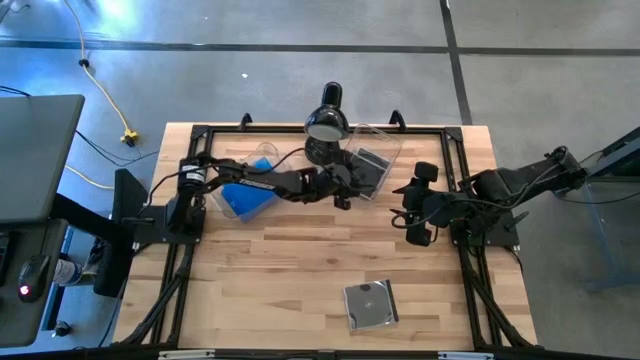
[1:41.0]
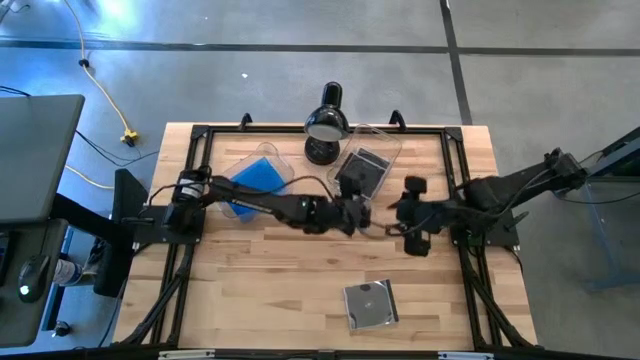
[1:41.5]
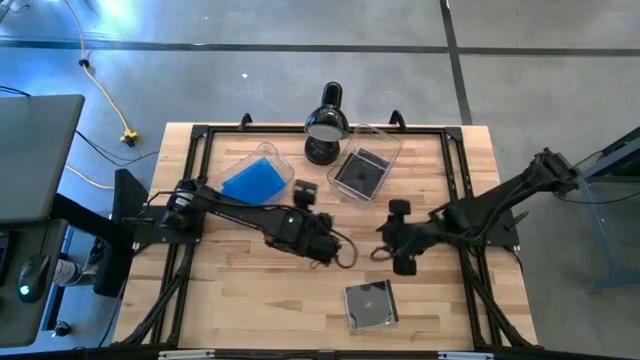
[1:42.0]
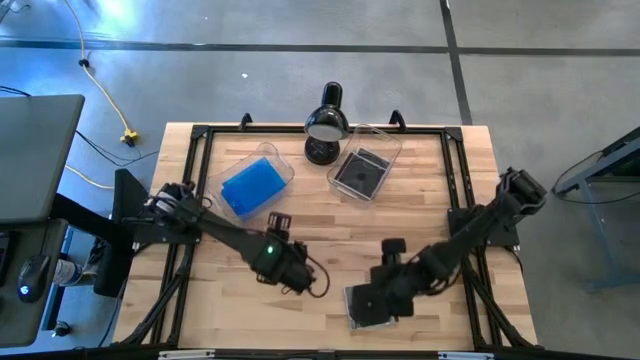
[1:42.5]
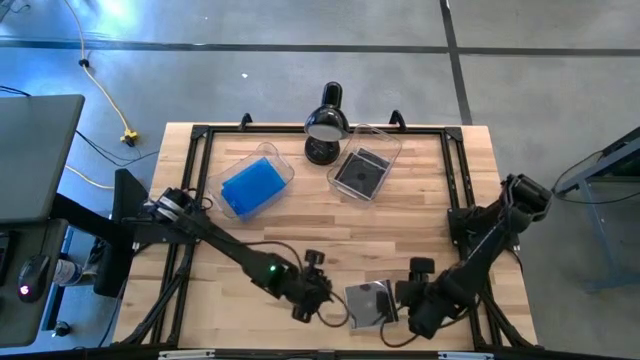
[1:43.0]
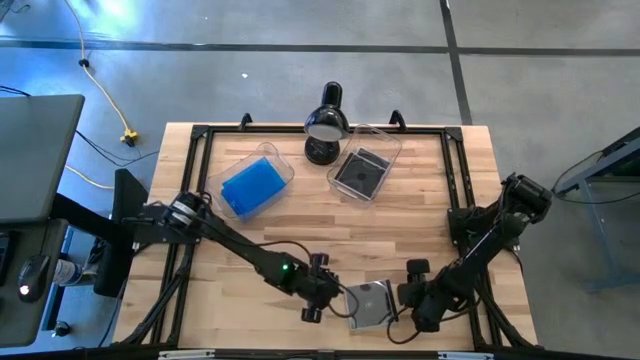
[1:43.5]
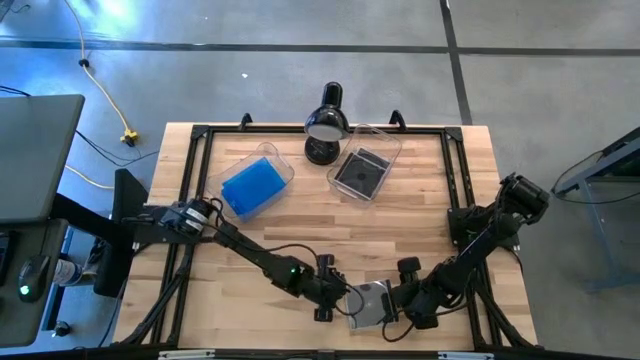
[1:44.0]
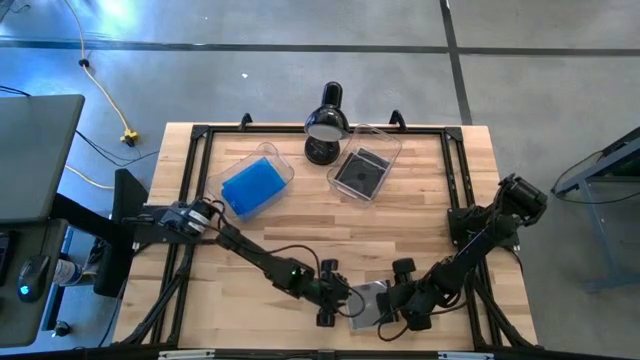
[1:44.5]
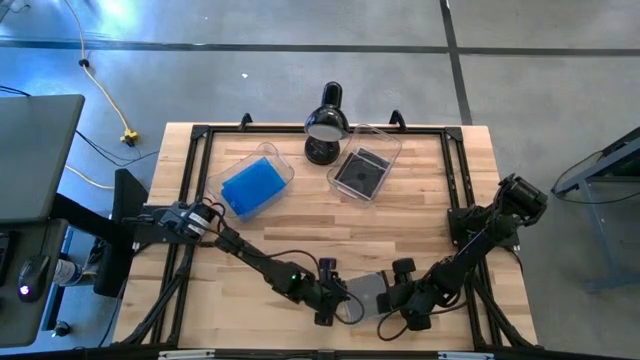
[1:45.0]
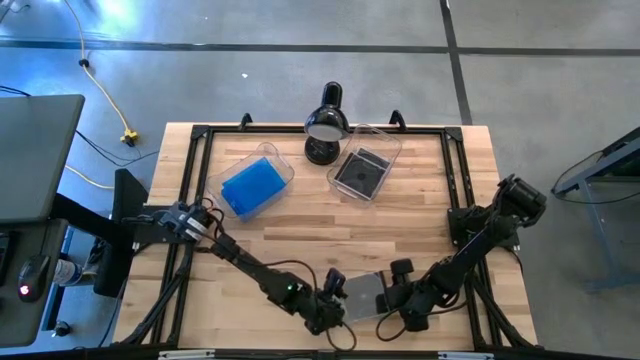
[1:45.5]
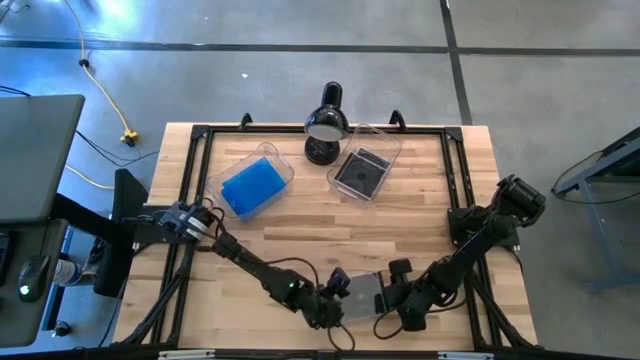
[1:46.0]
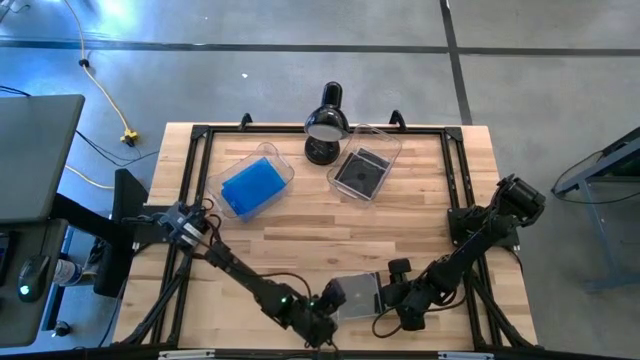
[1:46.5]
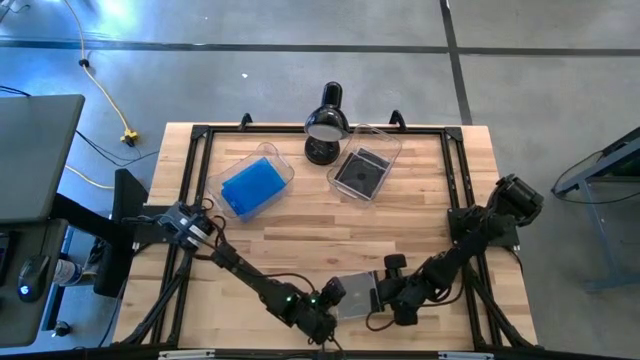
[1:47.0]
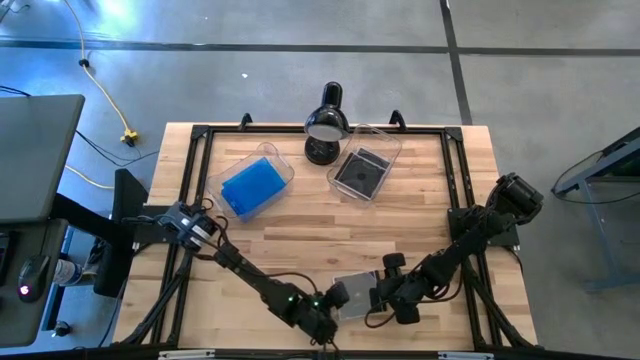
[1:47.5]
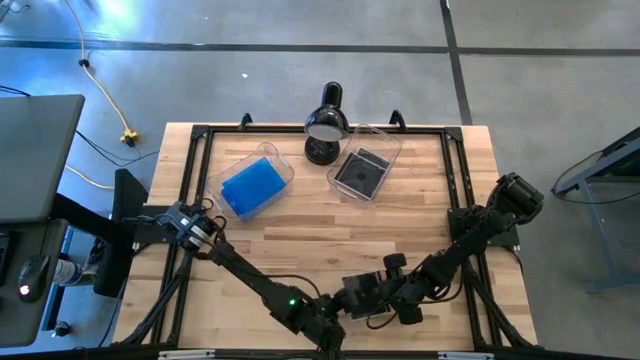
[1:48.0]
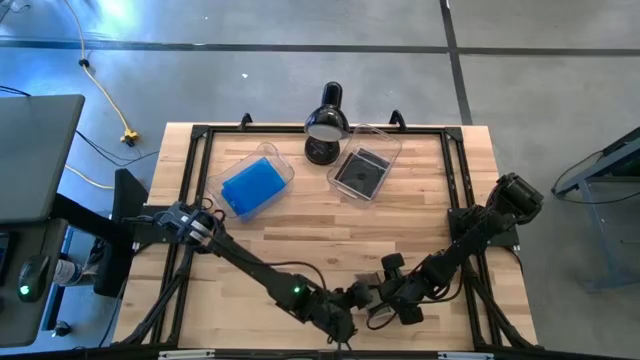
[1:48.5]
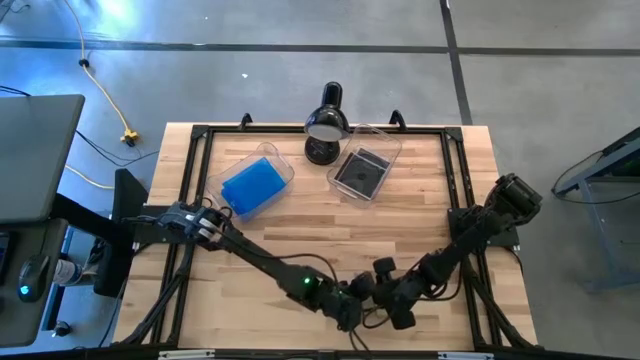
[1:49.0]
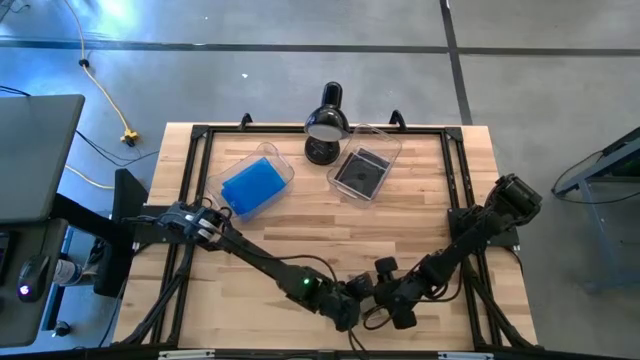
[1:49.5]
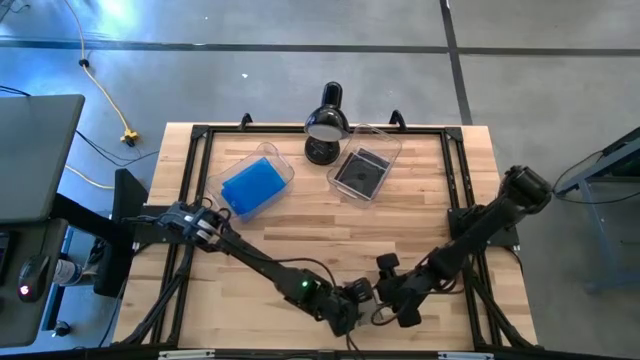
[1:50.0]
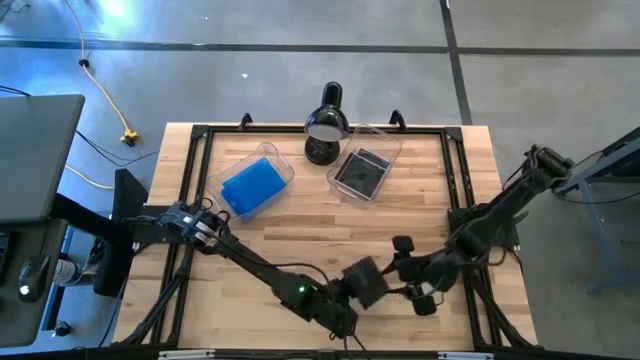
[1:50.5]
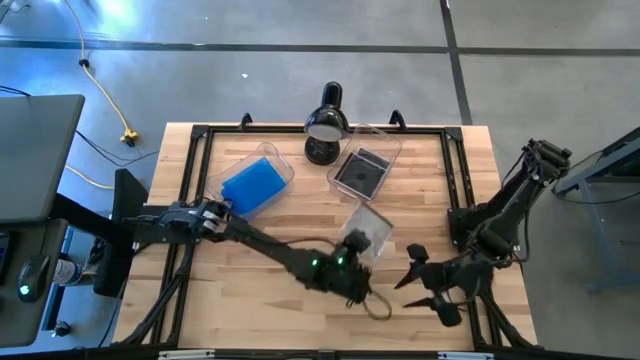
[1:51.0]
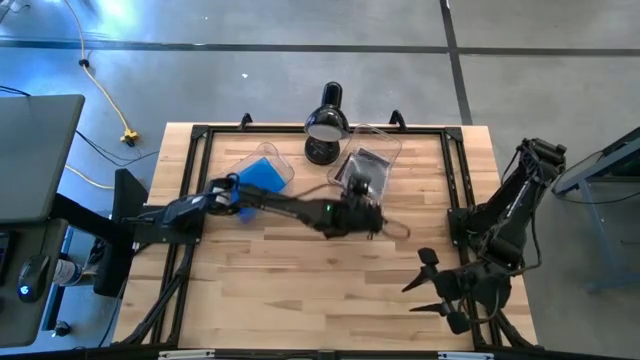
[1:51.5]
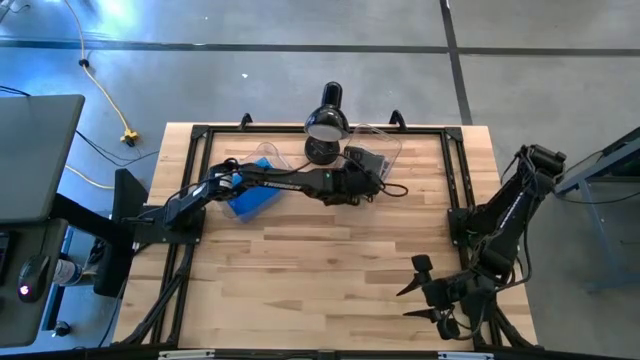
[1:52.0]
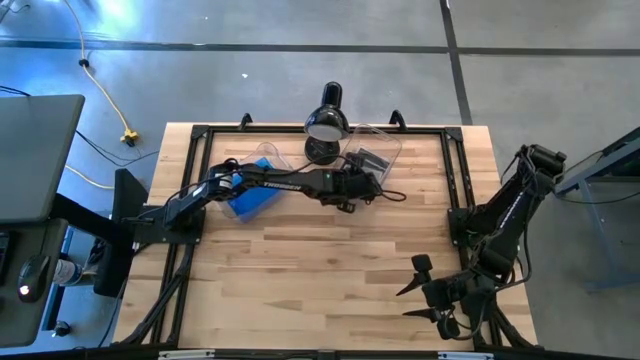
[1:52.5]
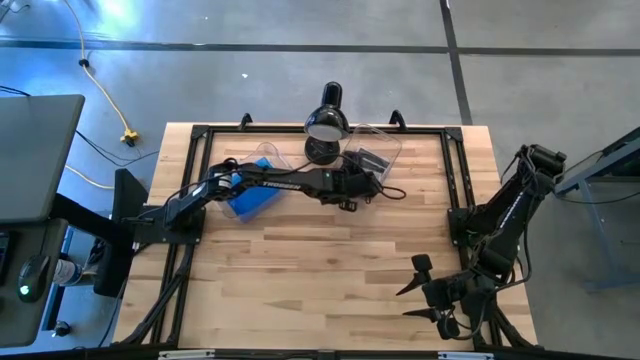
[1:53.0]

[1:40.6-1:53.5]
Task: Pick & place jewel cases by type
Put the black CD case into the right transparent bin

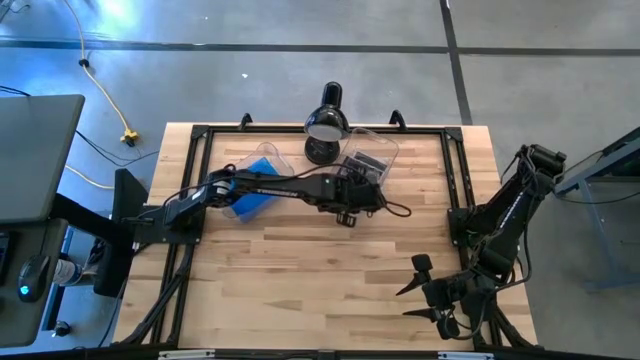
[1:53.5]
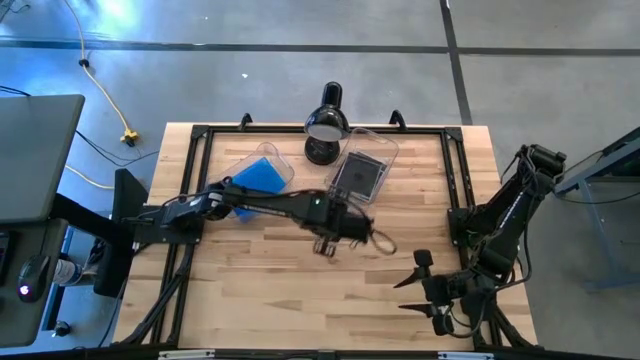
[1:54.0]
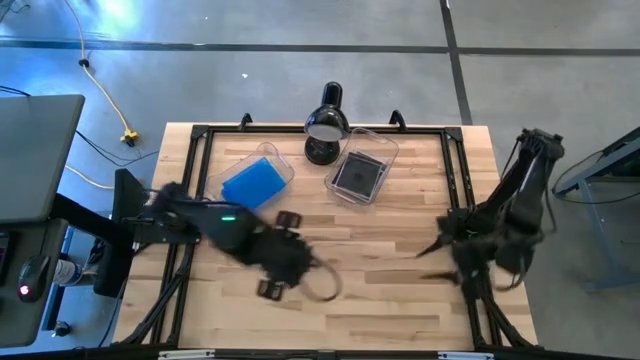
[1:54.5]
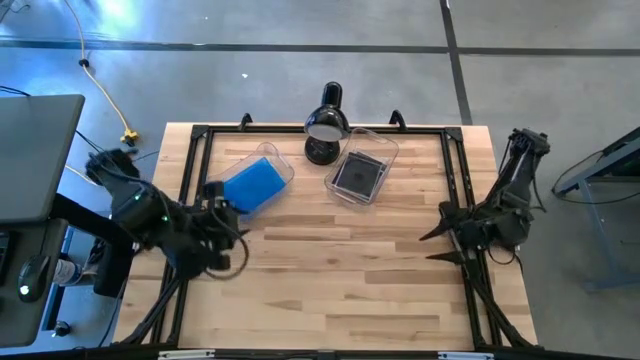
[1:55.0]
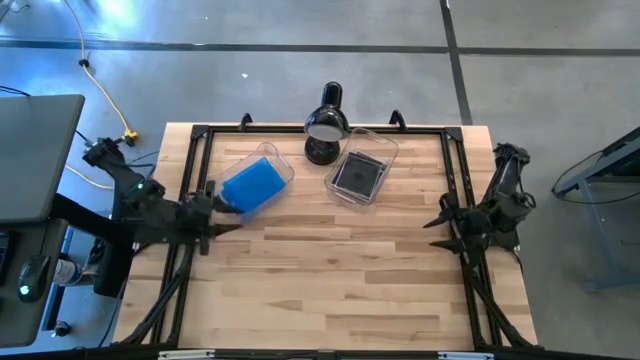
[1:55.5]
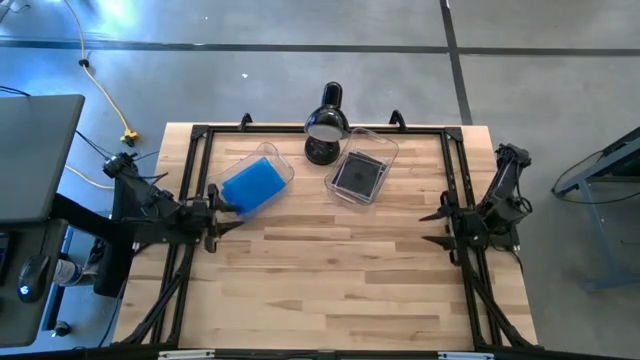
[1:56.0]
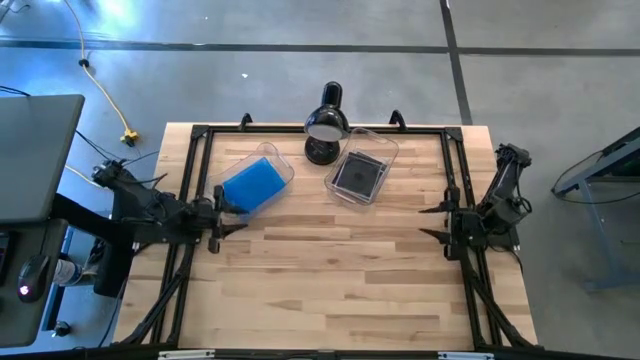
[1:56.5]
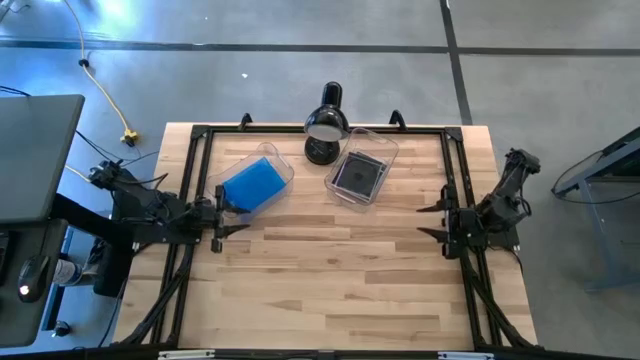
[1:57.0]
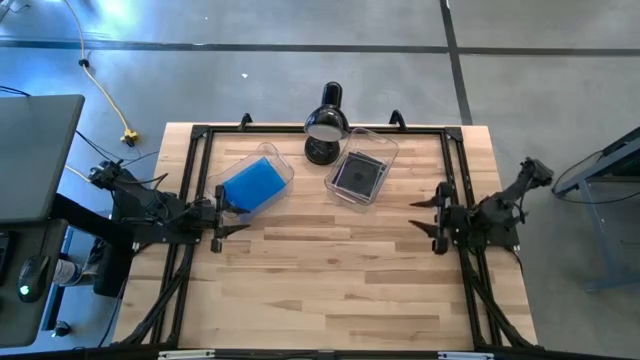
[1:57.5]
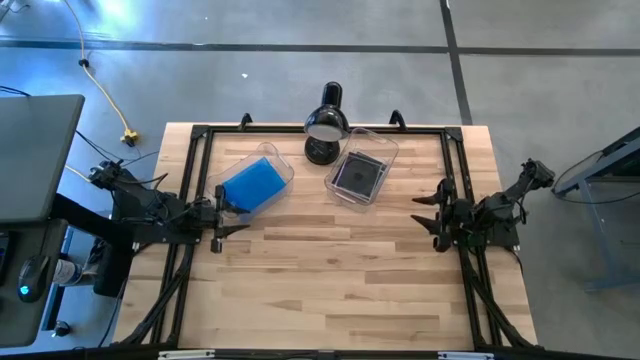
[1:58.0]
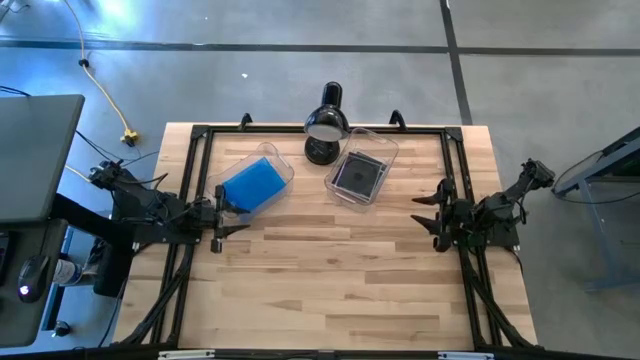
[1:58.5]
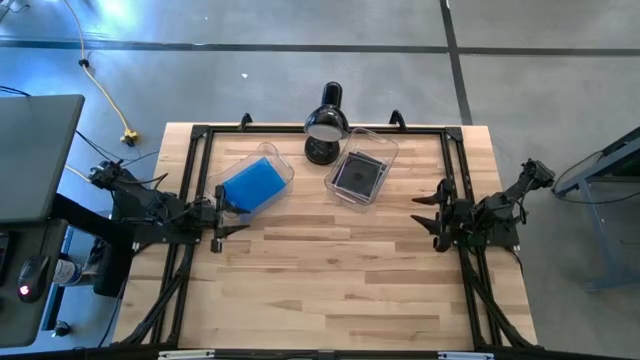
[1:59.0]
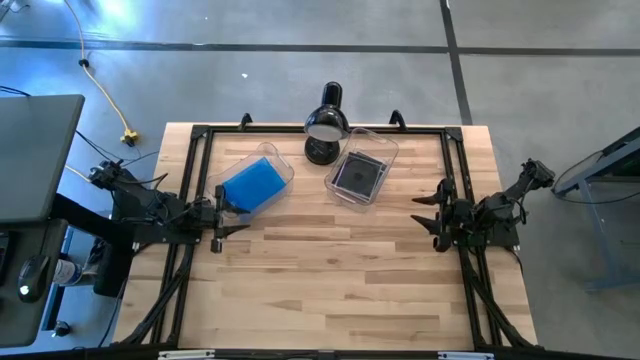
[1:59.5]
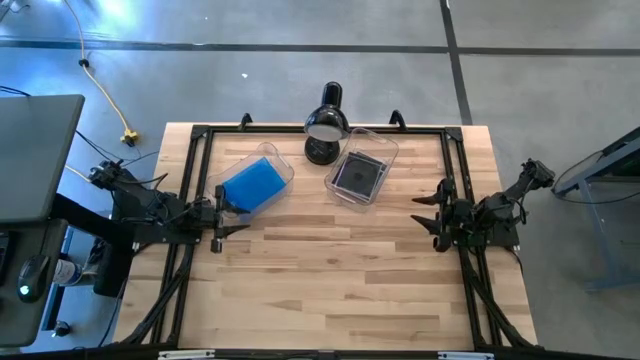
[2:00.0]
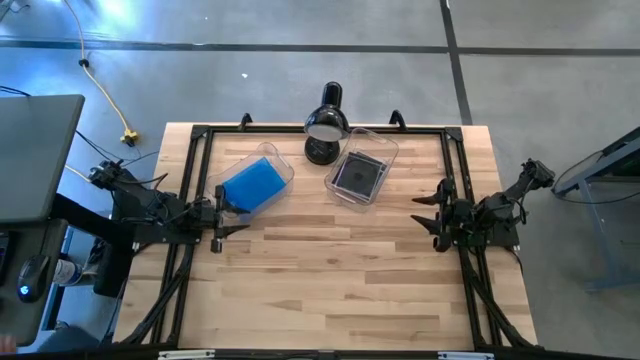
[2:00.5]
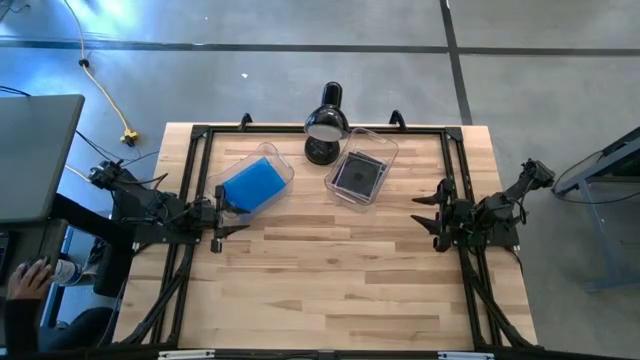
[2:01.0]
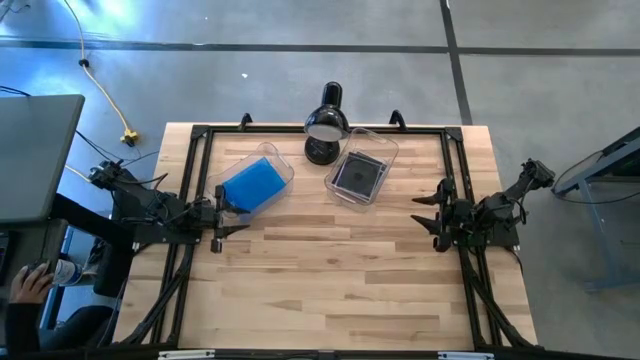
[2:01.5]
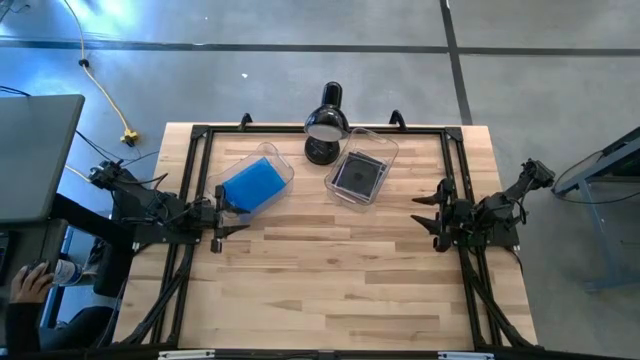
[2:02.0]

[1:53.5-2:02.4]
Return to Home Position
